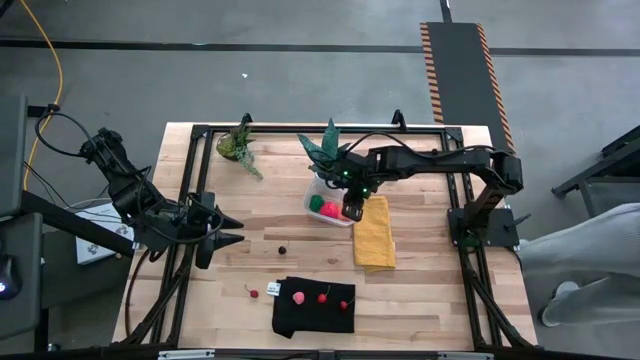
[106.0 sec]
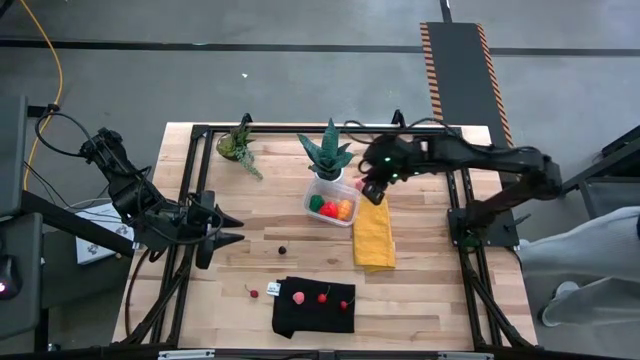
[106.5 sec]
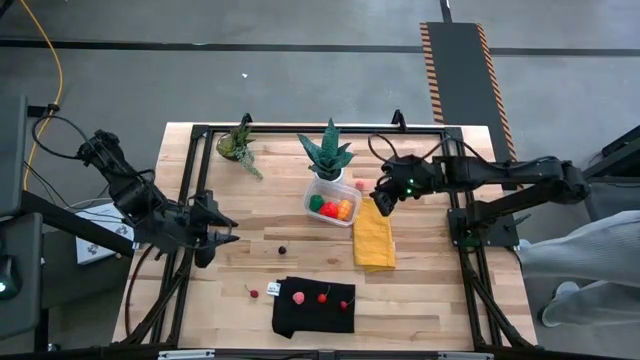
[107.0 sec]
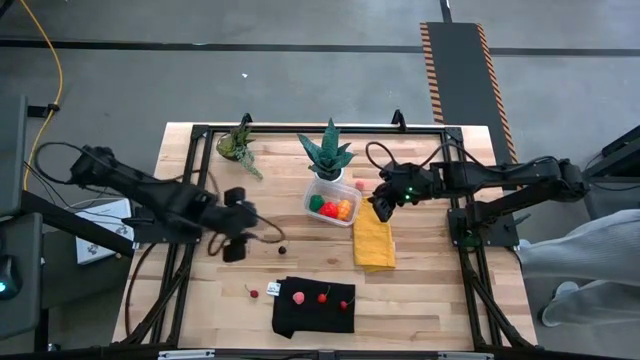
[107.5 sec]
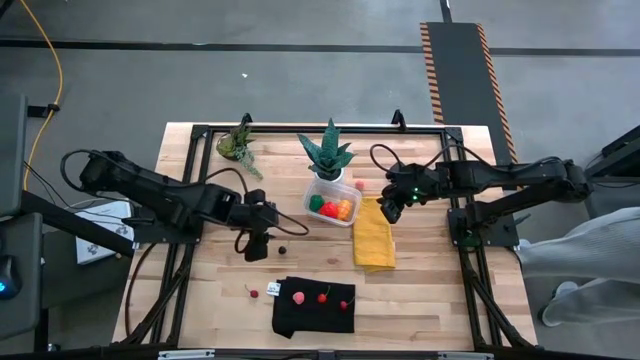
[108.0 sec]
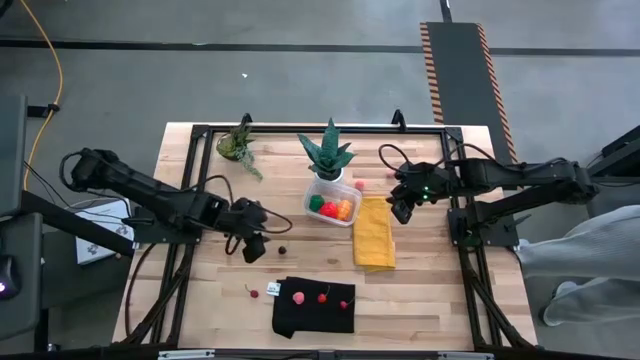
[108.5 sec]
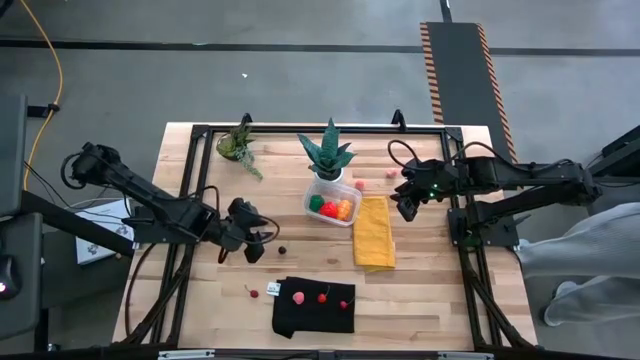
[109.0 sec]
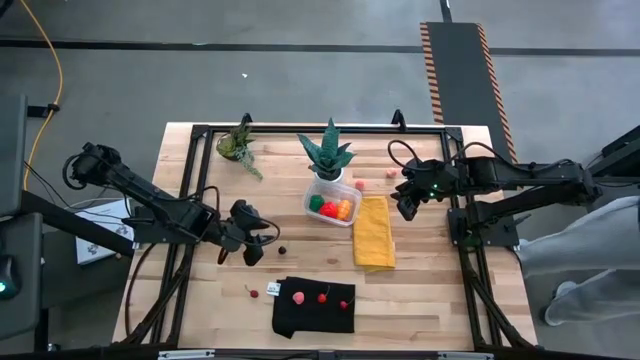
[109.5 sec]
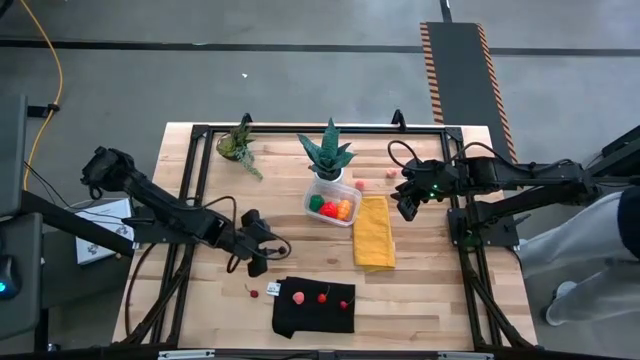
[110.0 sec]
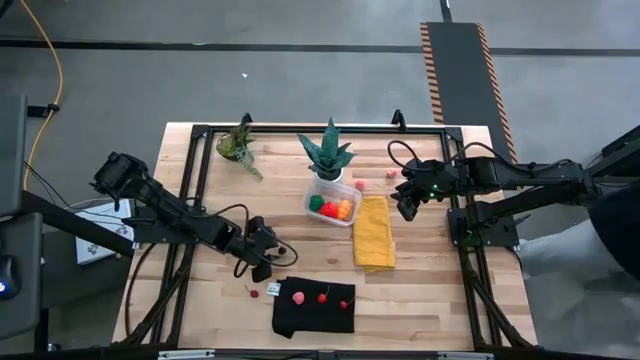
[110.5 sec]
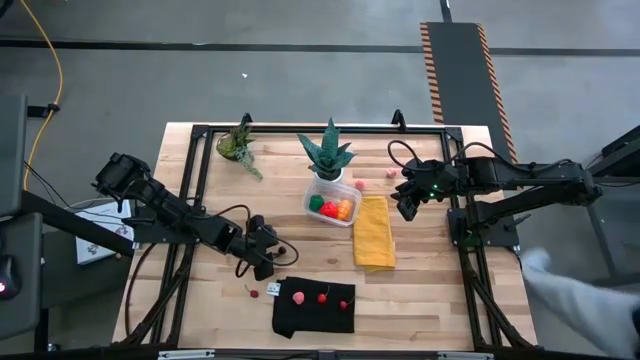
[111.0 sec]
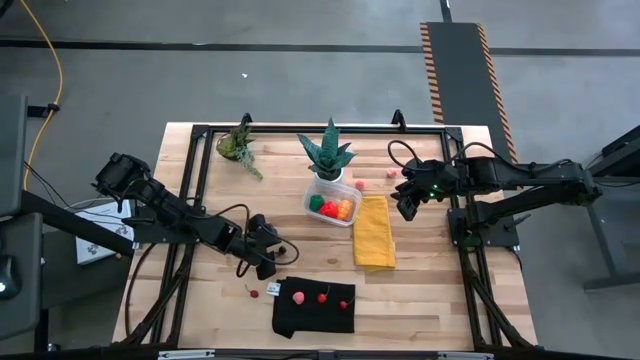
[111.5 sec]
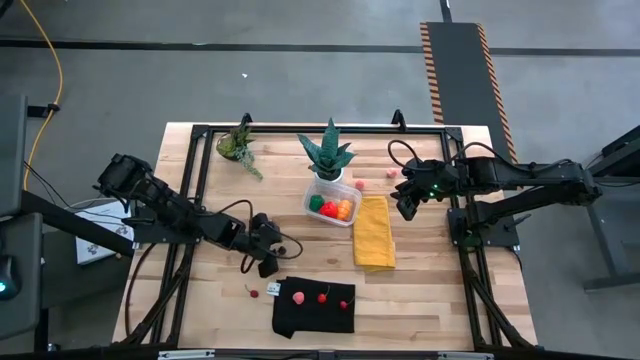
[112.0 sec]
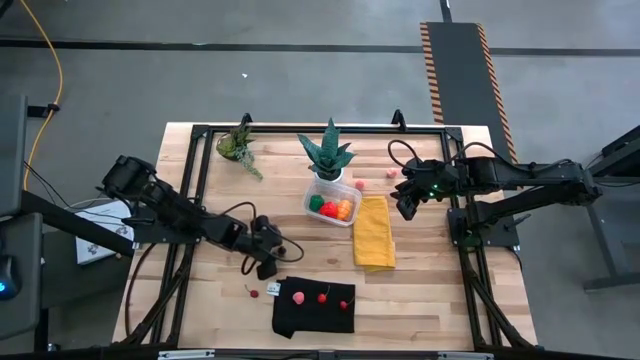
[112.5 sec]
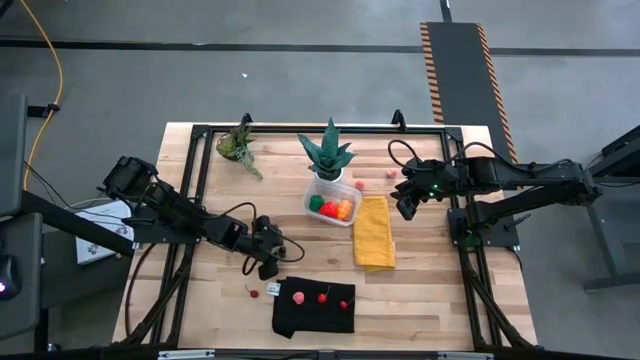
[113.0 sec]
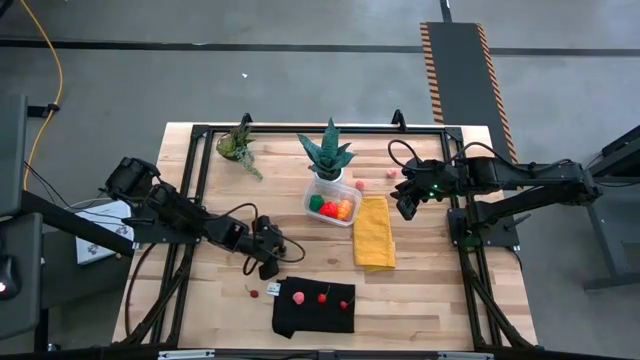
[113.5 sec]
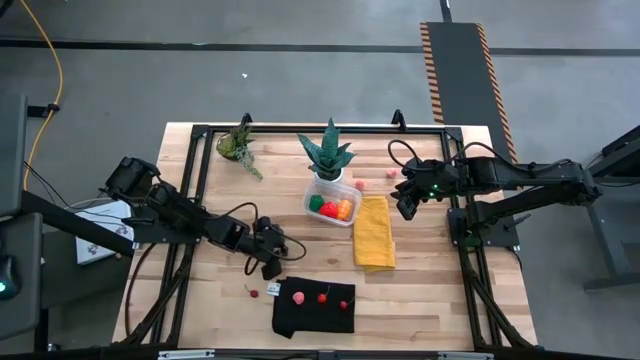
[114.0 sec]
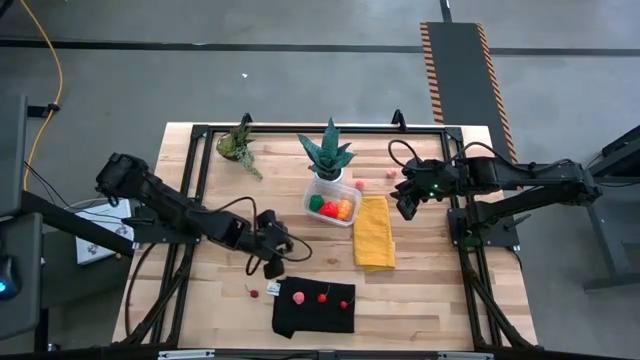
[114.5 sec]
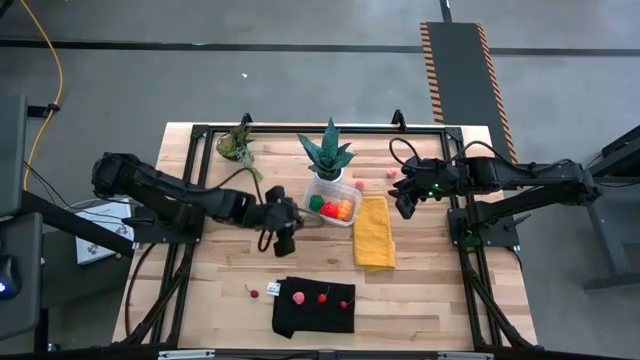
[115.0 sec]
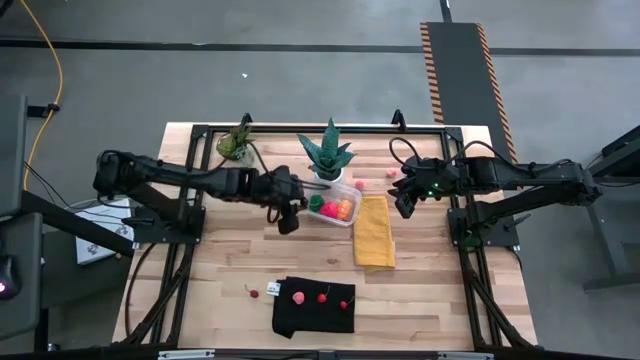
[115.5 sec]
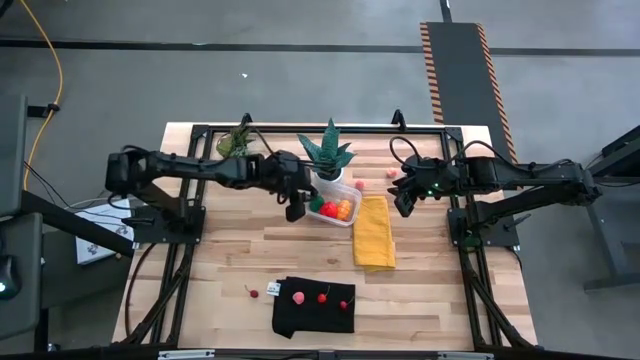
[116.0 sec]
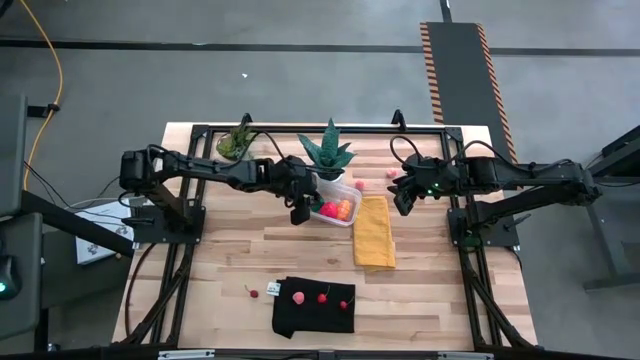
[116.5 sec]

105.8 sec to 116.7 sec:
Task: Pick and placing Produce into tupperware
Put the blueberry into the transparent container

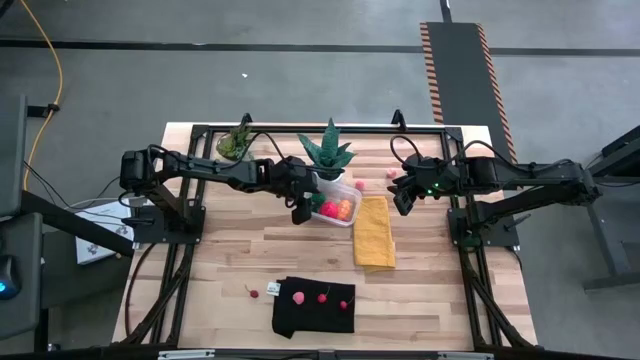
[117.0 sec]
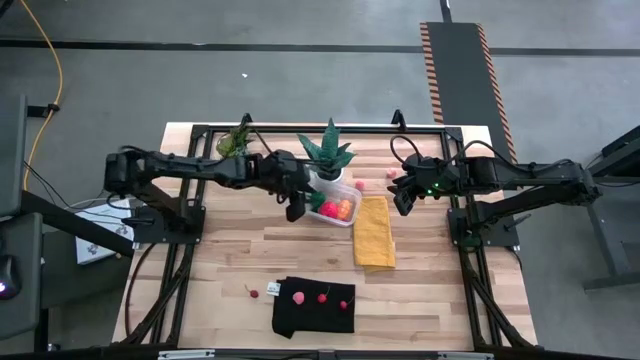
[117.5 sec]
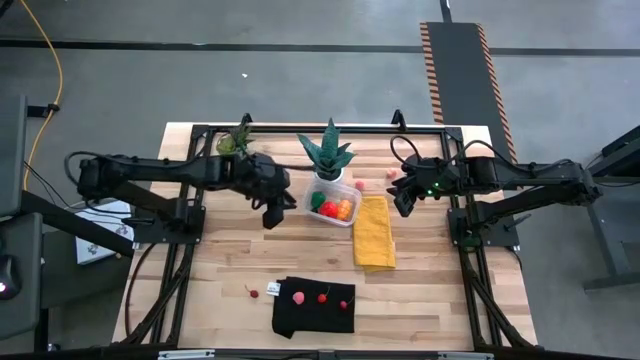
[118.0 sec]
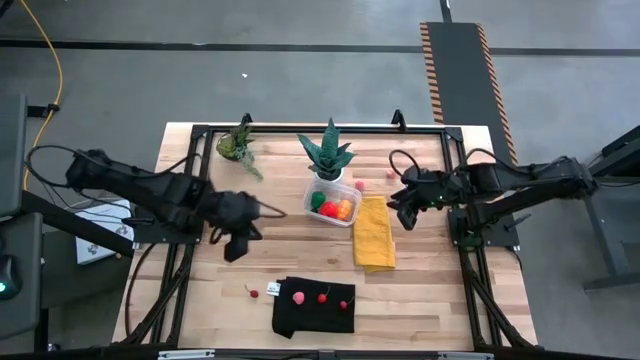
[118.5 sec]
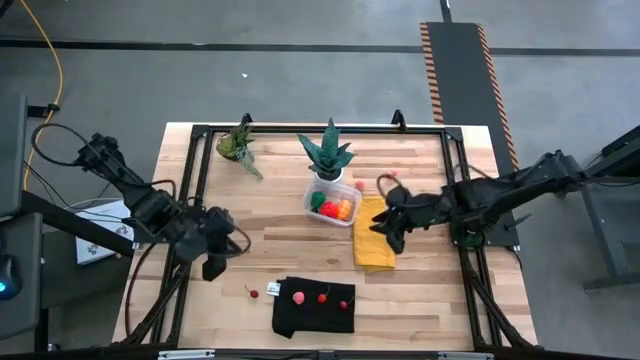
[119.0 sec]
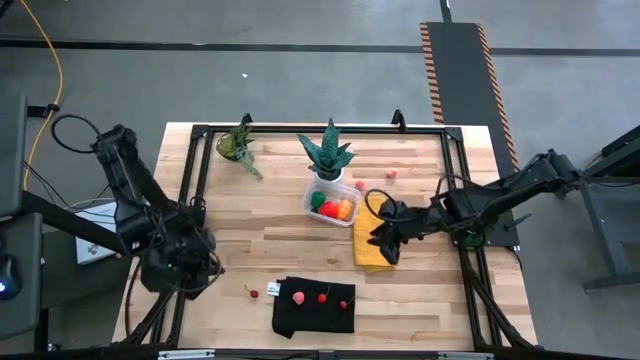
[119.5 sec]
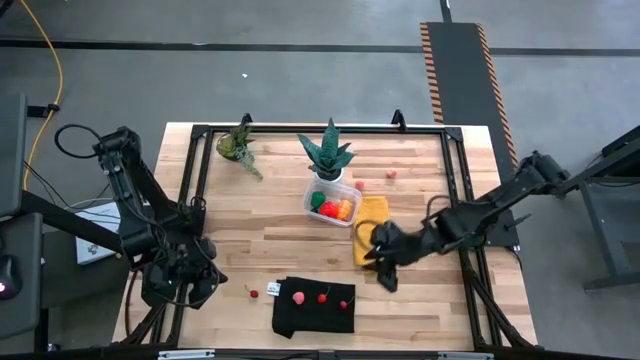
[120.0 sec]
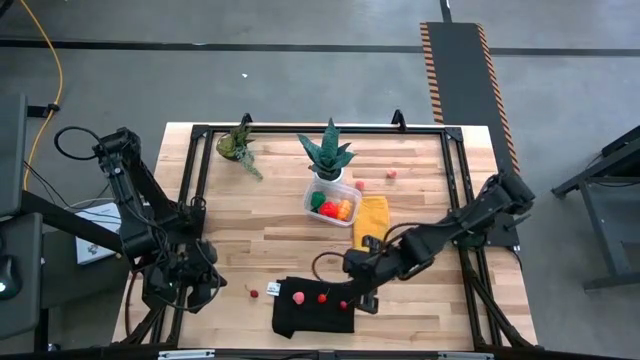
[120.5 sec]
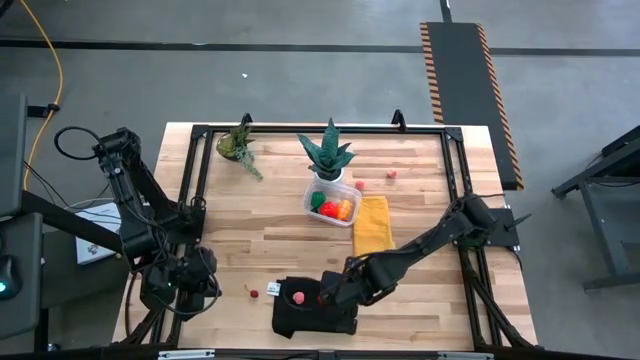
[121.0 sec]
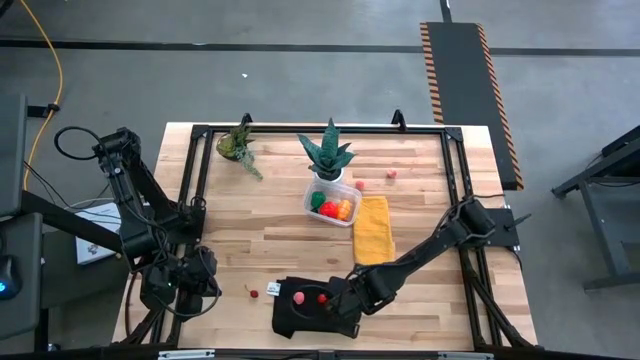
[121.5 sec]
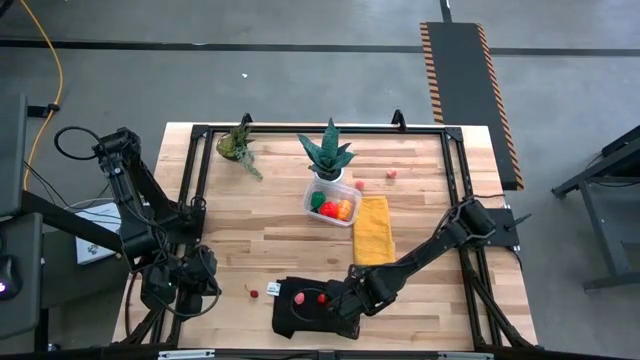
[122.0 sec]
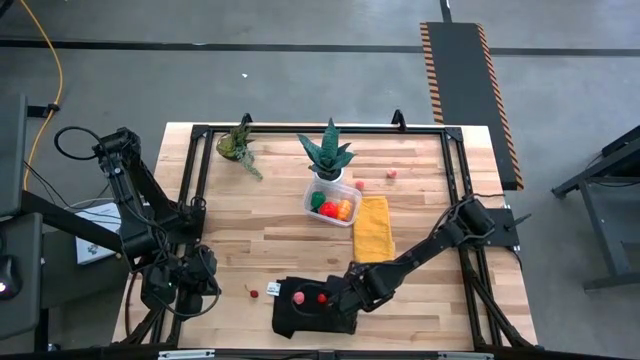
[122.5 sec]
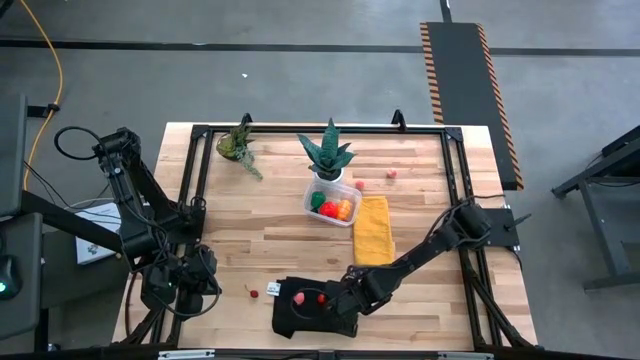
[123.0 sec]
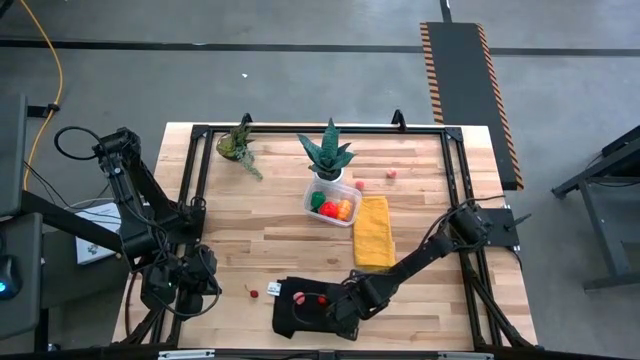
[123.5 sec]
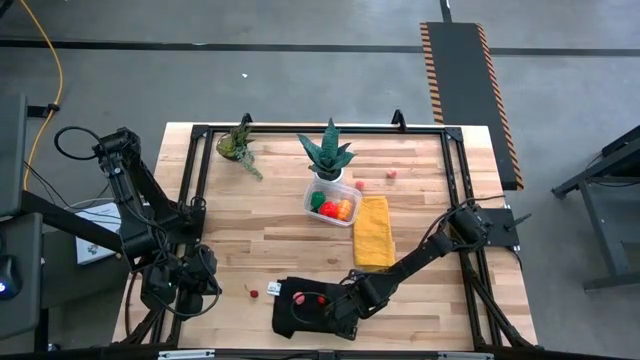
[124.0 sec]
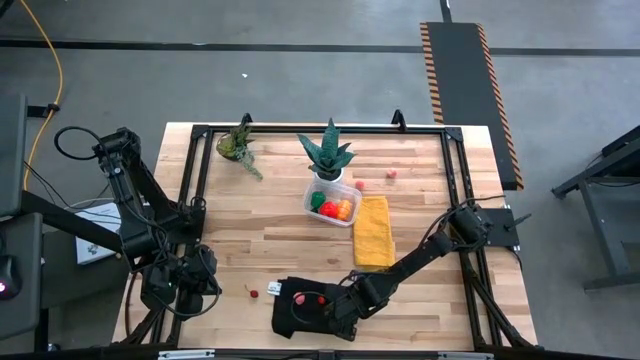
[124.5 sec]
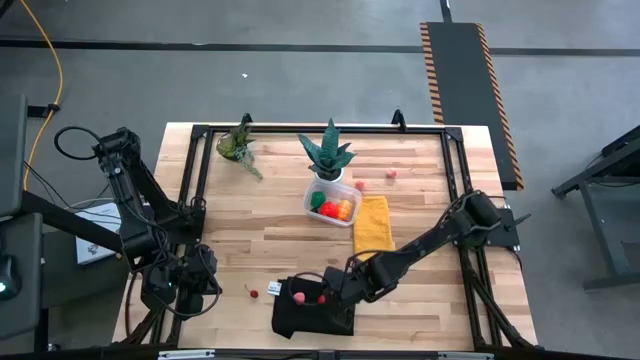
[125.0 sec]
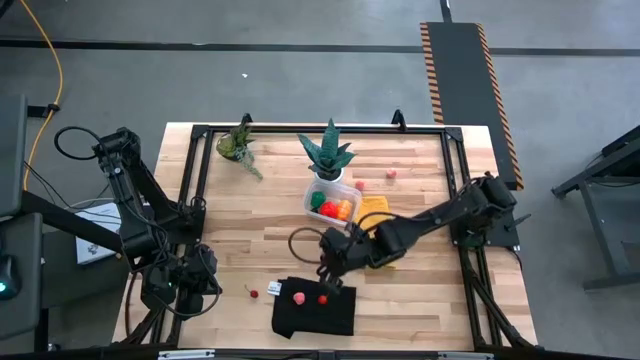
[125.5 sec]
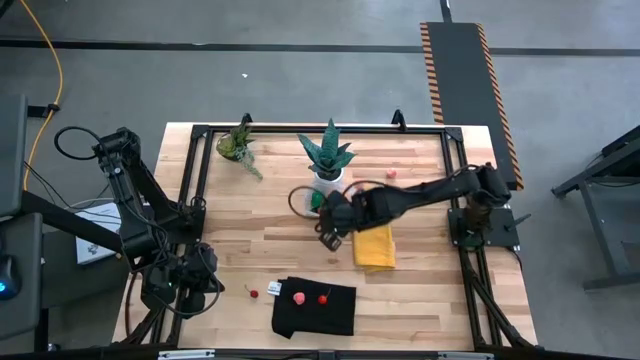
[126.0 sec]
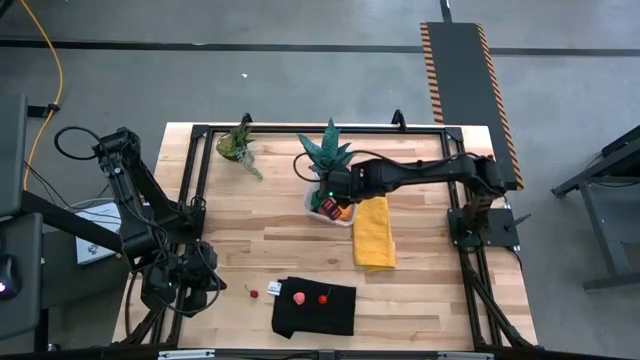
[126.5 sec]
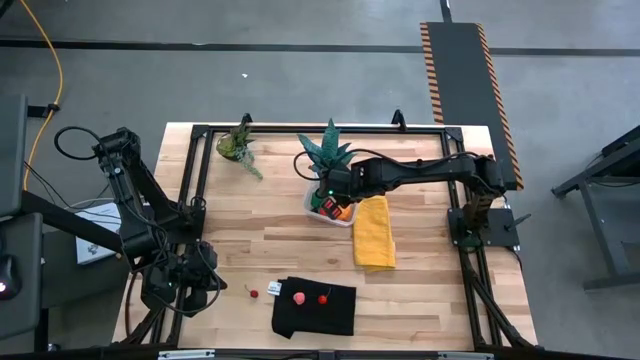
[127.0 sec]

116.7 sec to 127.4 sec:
Put the right red cherry into the transparent container
